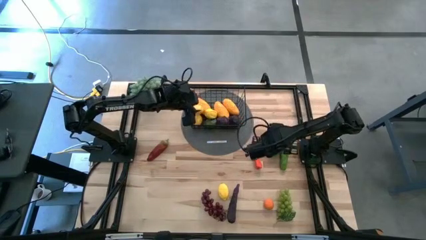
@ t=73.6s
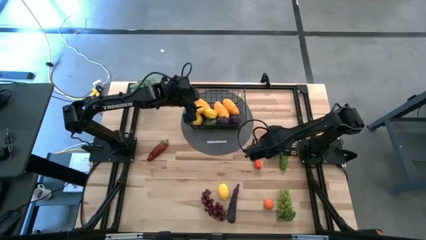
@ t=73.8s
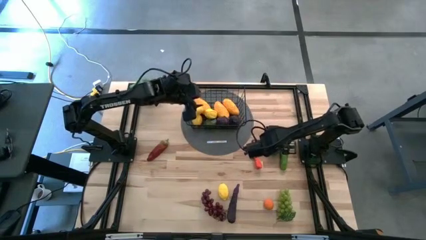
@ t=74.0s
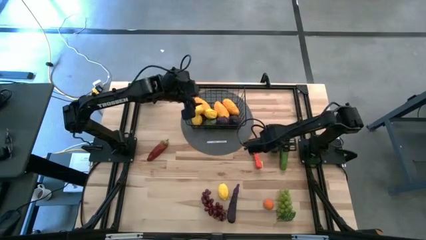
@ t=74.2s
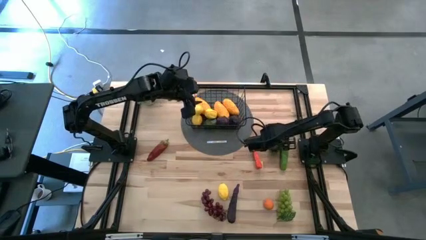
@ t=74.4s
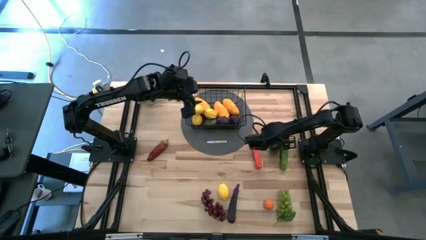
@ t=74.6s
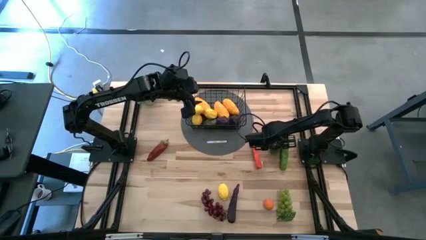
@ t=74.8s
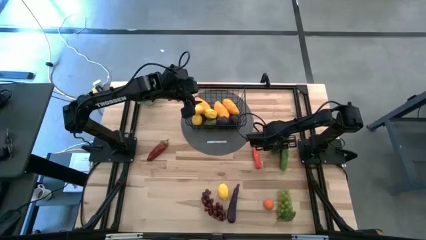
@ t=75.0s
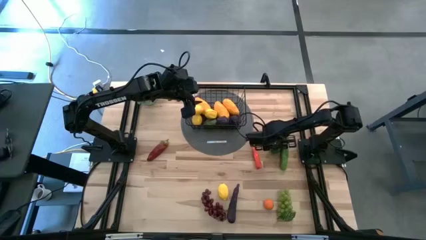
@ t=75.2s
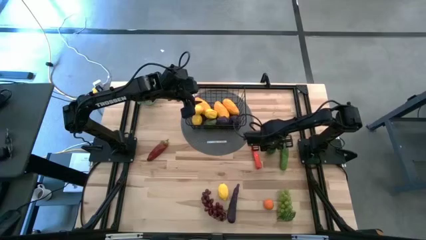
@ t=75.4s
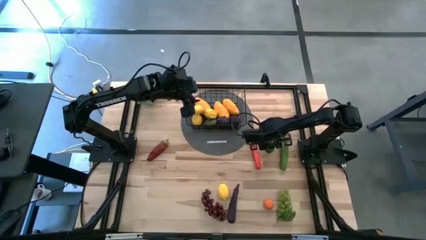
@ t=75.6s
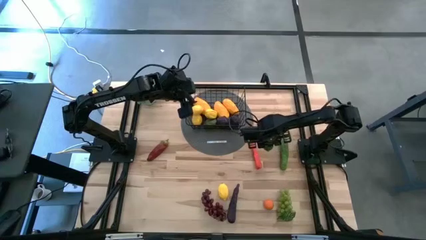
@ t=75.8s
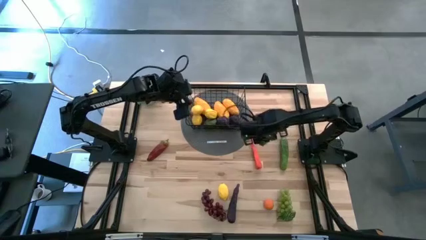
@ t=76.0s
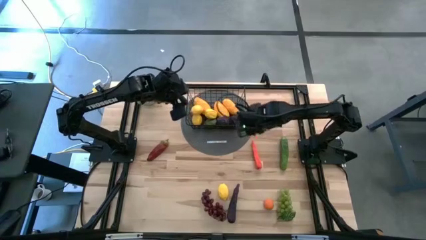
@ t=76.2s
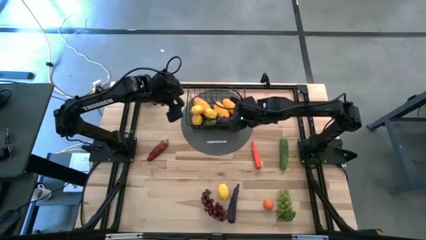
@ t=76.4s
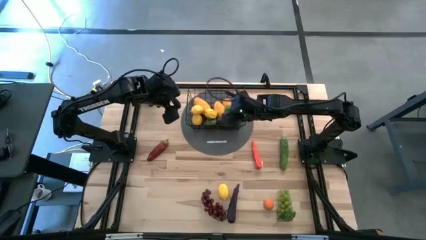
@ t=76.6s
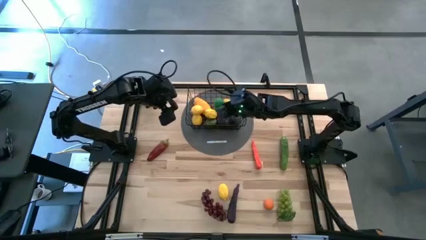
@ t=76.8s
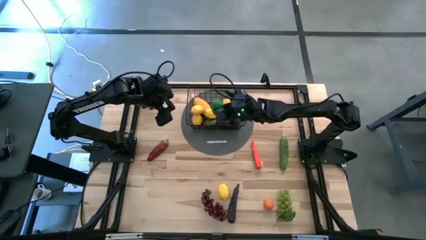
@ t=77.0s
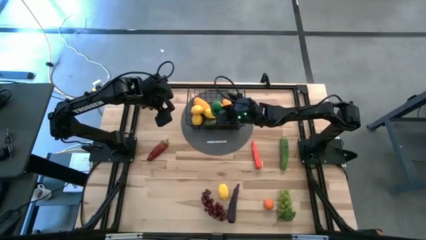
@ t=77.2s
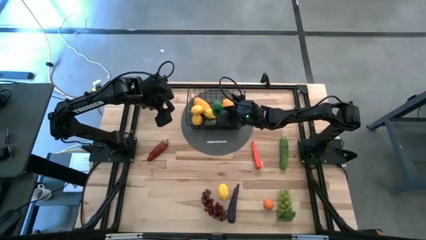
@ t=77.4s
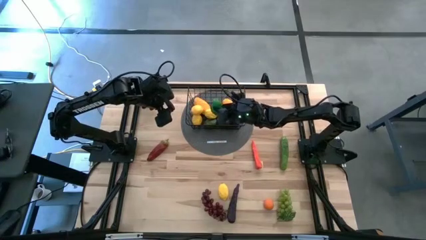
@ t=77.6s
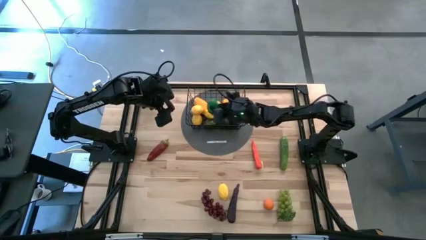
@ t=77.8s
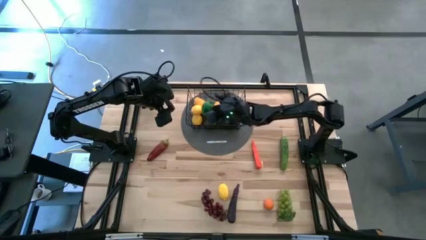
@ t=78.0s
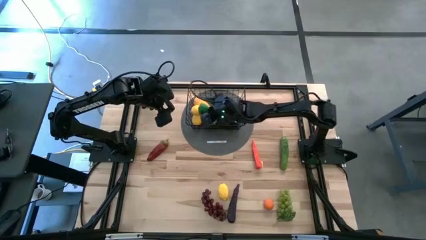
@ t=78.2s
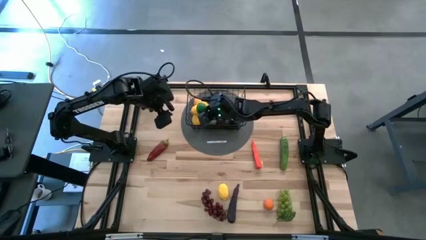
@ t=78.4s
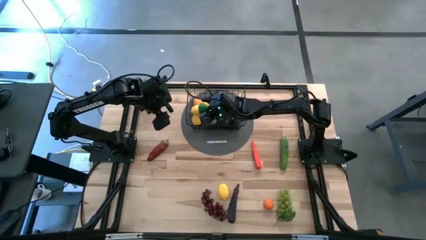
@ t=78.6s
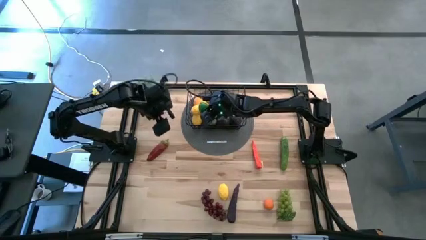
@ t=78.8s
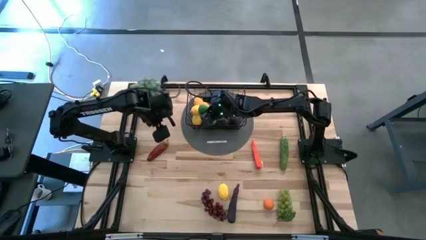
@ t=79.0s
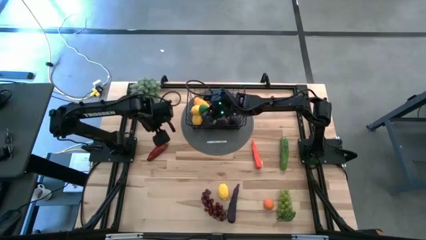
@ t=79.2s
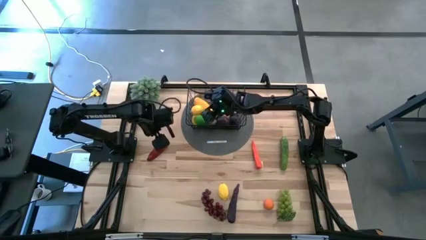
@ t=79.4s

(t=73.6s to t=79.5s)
Task: Build produce basket
Put the green lemon into the black wire basket

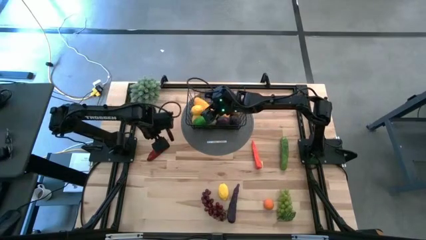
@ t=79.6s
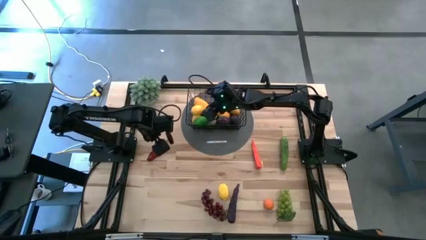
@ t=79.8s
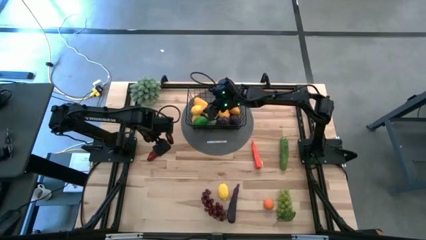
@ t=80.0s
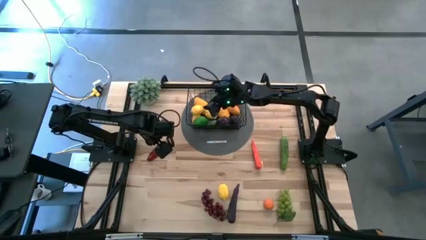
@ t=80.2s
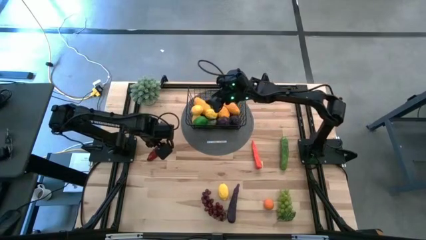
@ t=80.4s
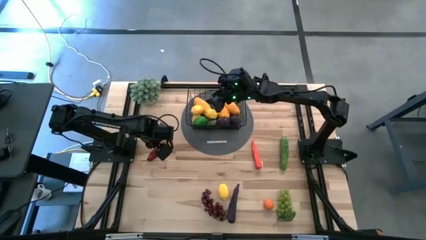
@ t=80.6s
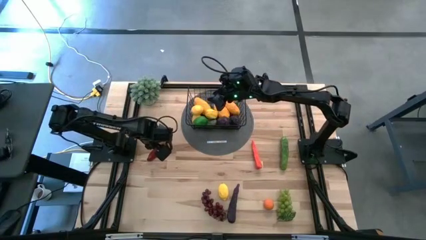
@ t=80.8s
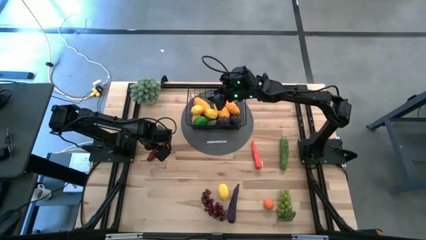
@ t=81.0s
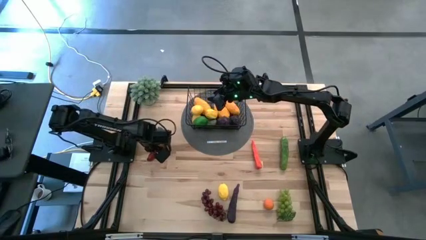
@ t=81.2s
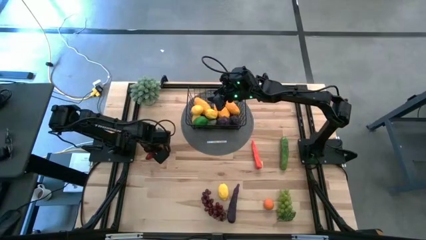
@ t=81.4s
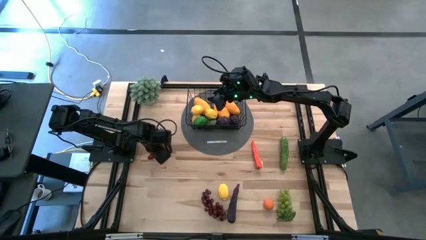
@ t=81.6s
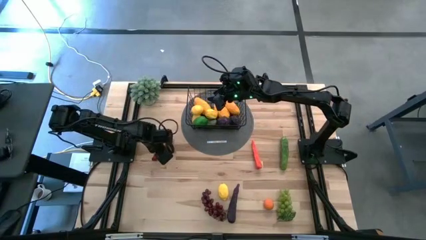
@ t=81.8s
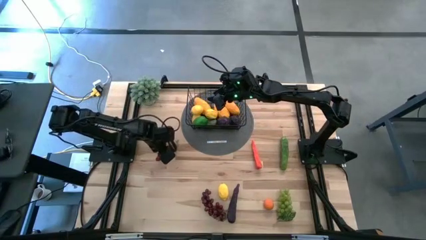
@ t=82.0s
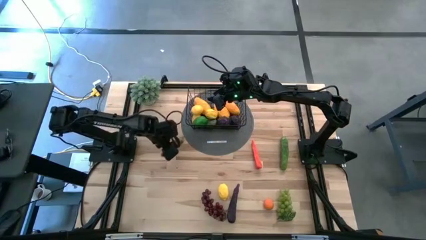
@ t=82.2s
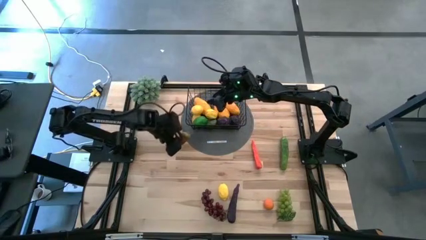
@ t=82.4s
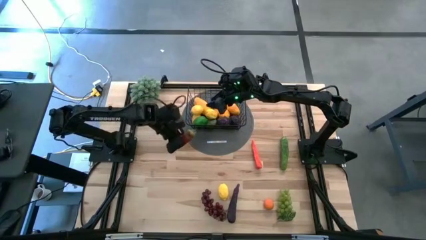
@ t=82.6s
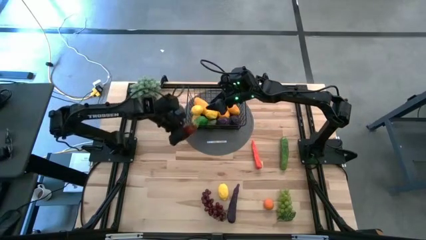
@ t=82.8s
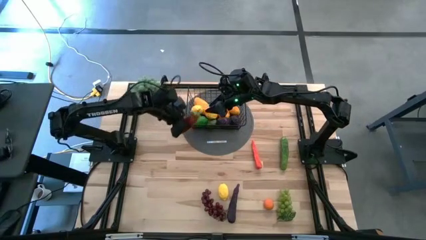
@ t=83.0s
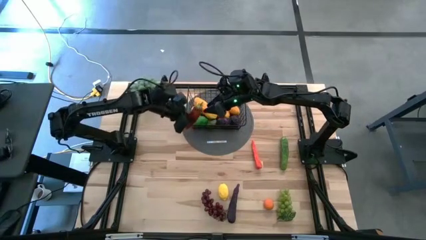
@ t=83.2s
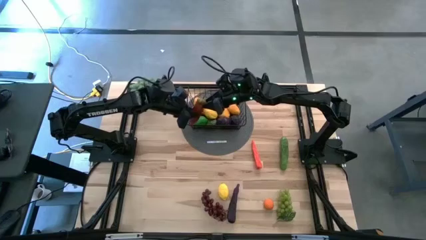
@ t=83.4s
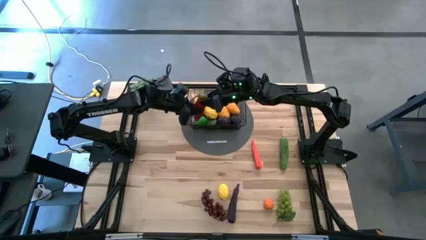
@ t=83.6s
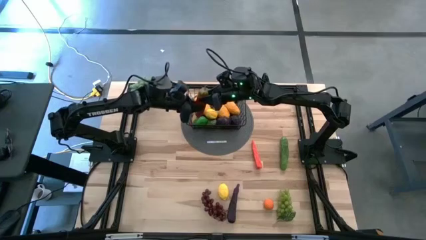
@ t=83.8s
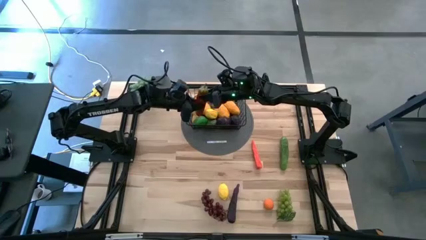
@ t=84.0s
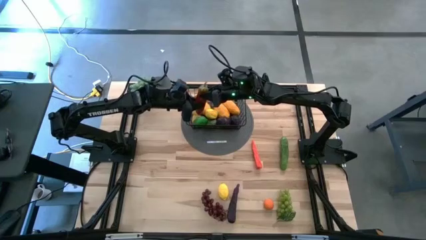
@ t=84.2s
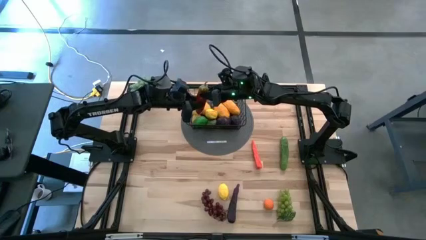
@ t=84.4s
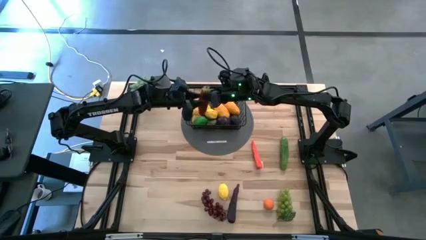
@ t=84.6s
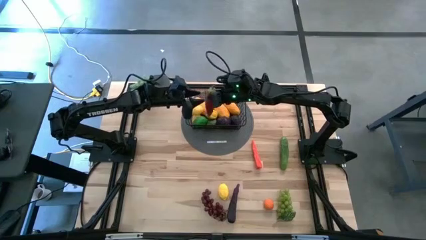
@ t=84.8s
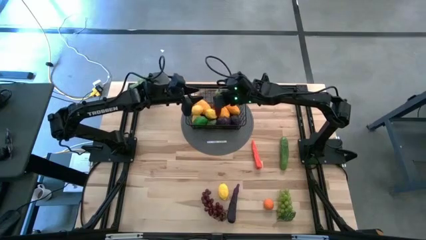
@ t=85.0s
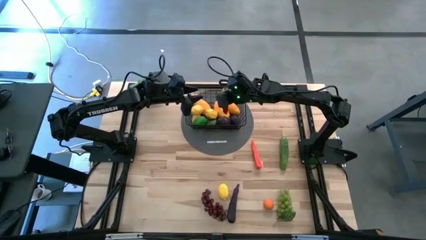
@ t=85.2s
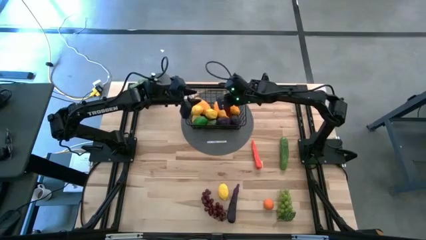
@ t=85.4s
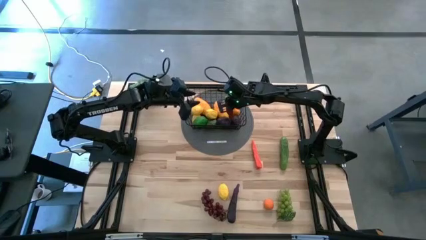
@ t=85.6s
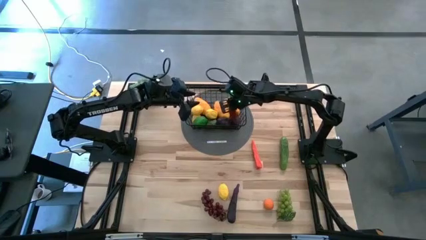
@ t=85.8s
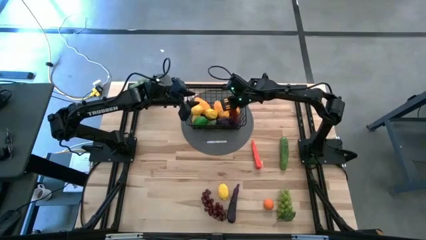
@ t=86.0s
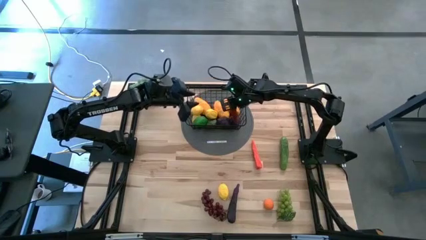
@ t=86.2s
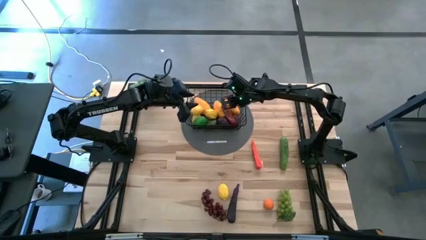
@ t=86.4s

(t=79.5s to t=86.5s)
Put the red chili pepper into the black wire basket

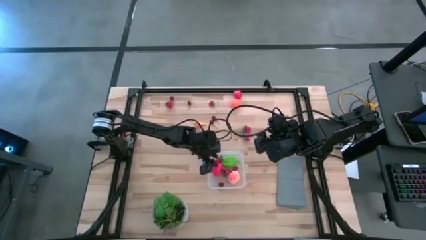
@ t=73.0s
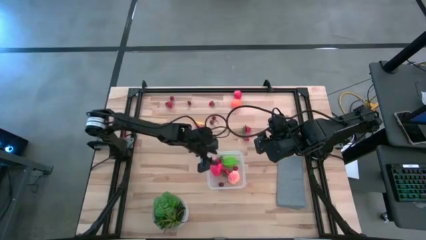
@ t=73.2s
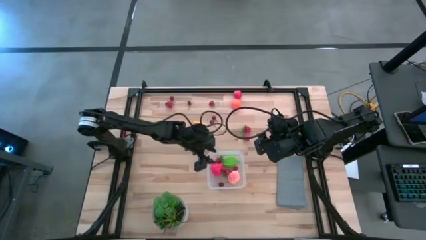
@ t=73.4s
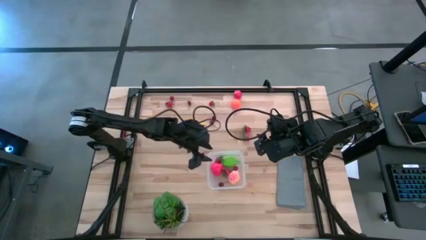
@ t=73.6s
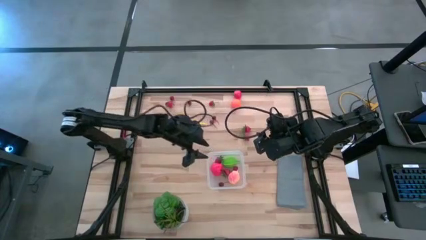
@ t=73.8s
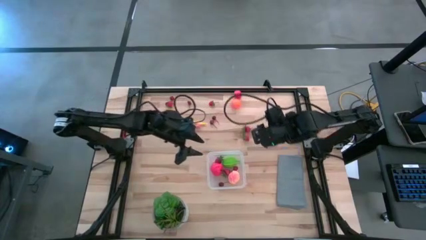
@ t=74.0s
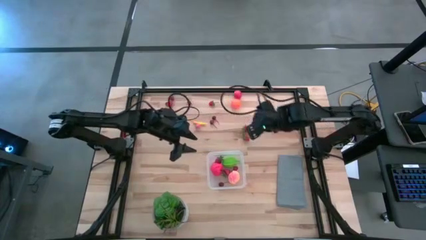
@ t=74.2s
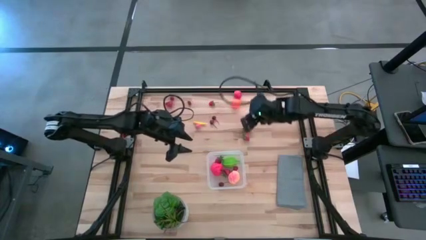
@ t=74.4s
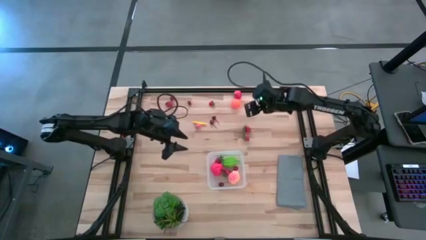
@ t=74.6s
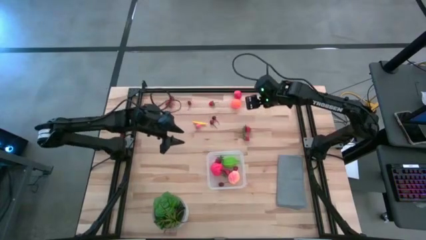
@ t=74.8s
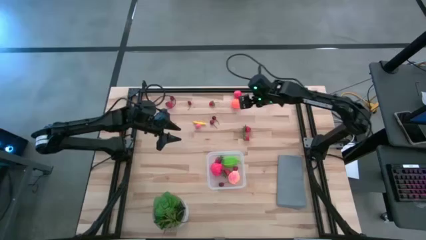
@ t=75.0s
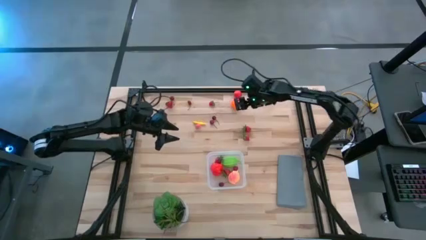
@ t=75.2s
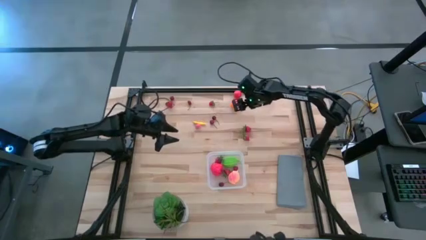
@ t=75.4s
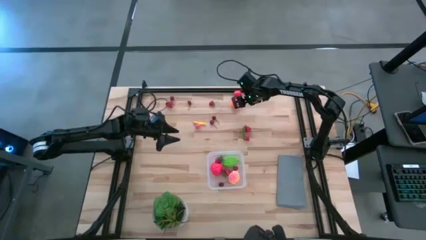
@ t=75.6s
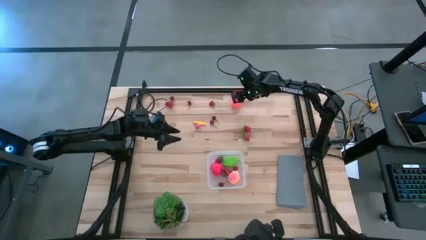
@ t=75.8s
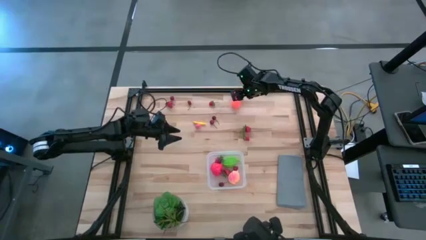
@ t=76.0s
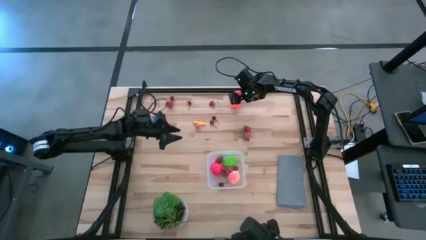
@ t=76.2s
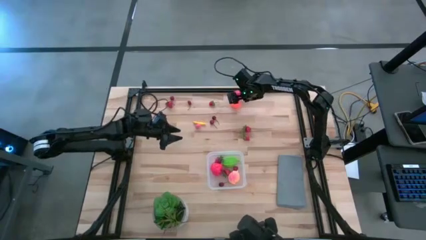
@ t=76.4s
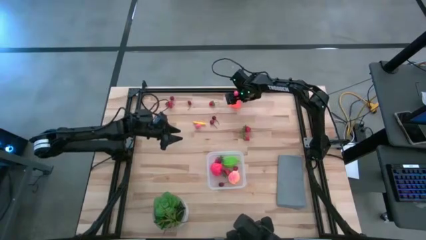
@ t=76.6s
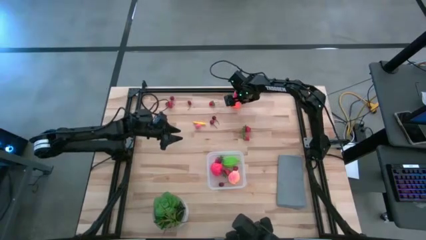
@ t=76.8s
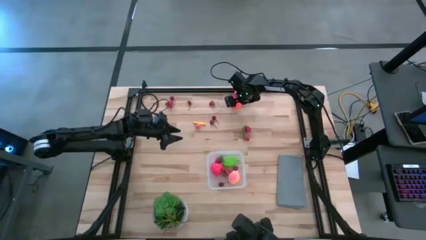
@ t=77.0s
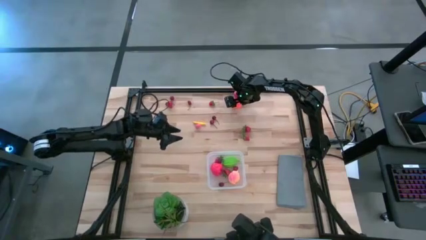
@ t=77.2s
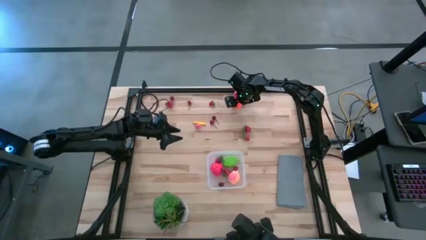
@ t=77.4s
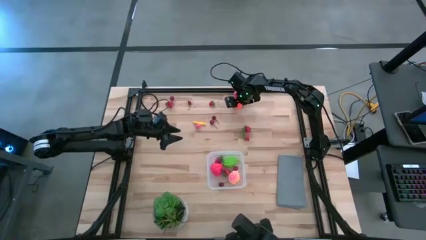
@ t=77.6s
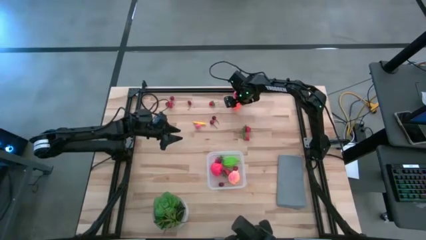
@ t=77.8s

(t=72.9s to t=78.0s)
Task: Pick and placing Produce into tupperware
Put the orange pumpkin into the transparent bin
